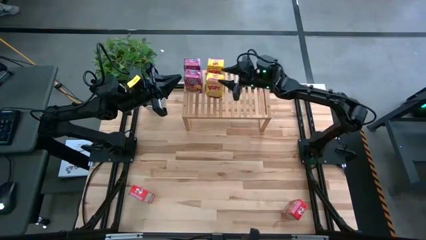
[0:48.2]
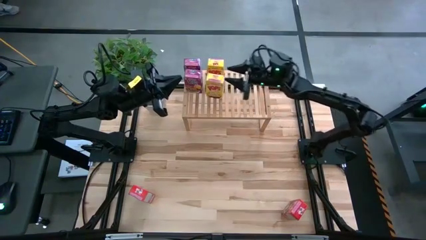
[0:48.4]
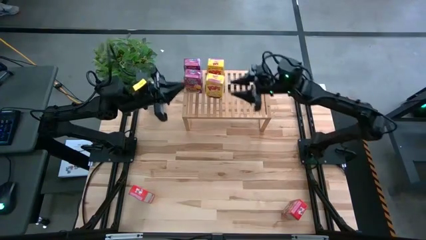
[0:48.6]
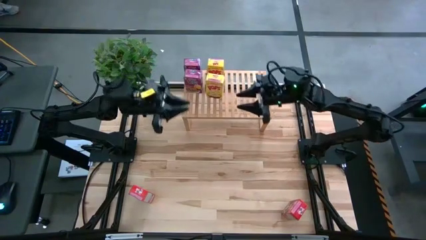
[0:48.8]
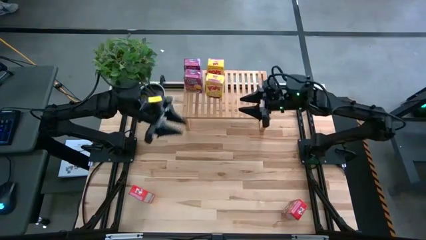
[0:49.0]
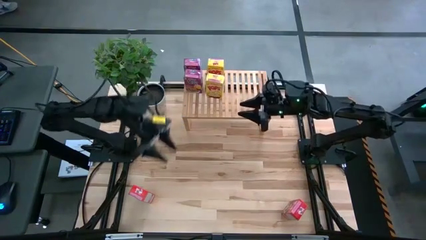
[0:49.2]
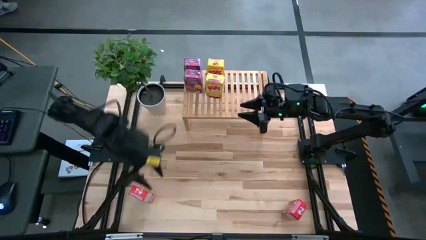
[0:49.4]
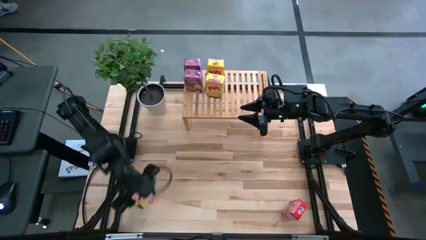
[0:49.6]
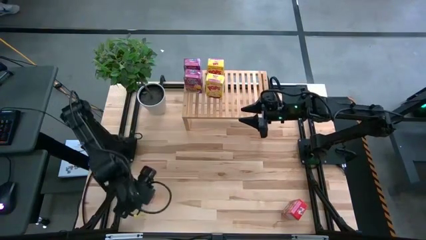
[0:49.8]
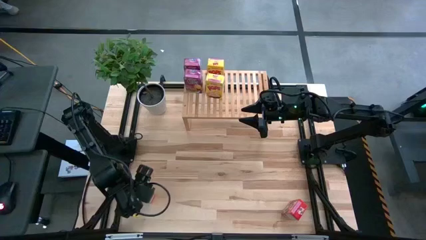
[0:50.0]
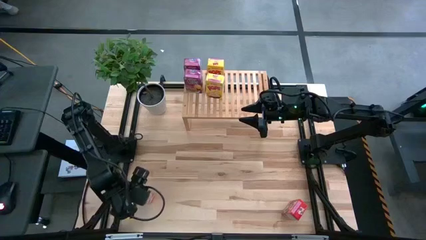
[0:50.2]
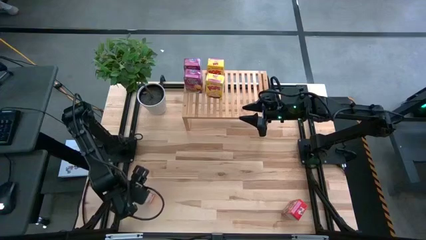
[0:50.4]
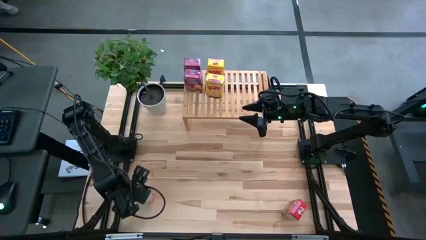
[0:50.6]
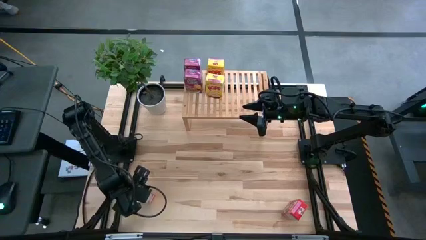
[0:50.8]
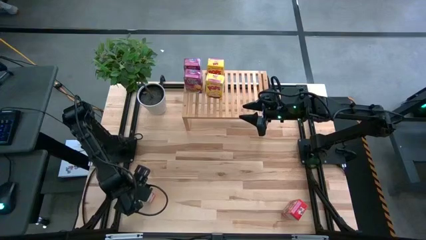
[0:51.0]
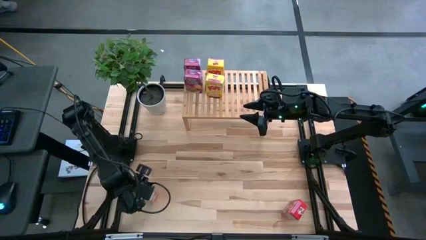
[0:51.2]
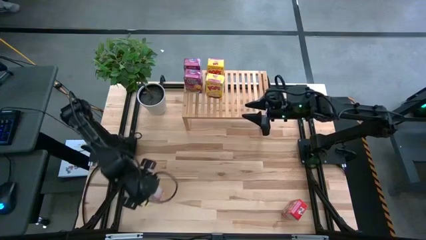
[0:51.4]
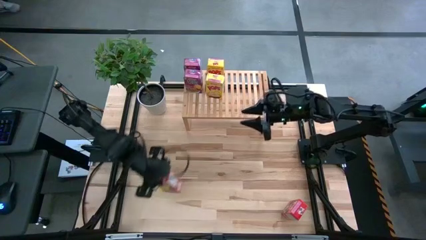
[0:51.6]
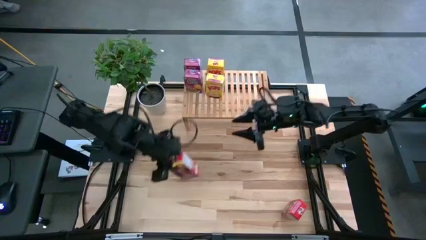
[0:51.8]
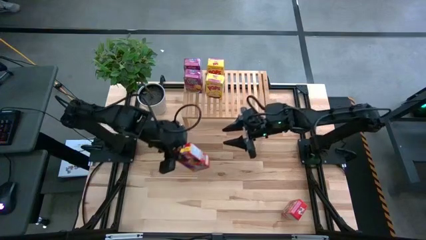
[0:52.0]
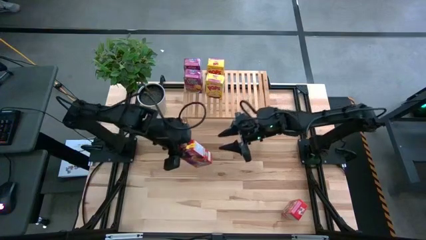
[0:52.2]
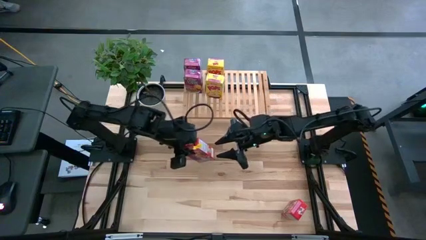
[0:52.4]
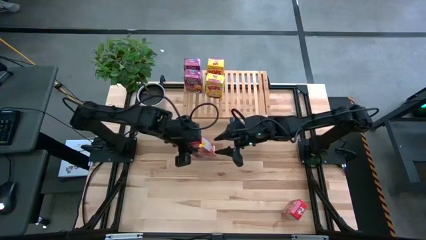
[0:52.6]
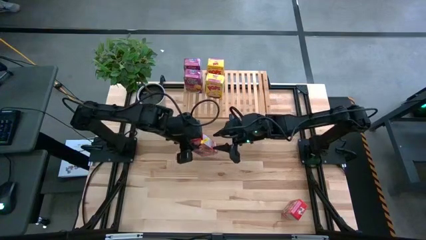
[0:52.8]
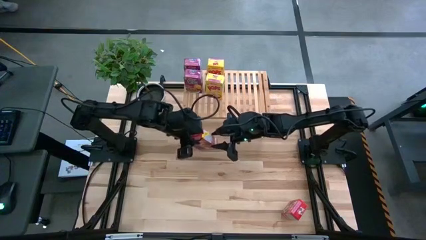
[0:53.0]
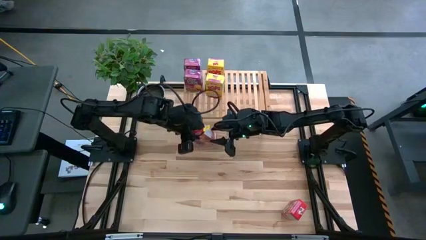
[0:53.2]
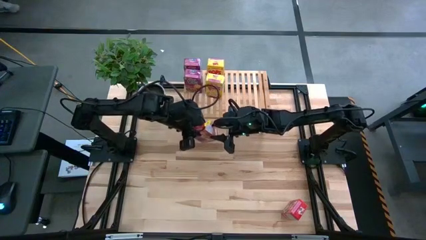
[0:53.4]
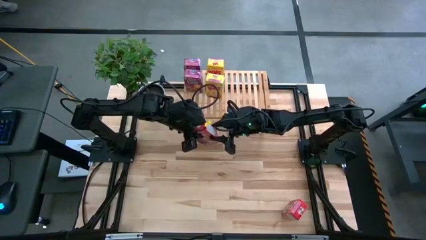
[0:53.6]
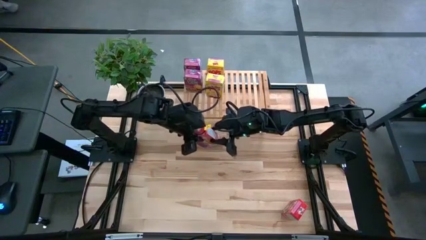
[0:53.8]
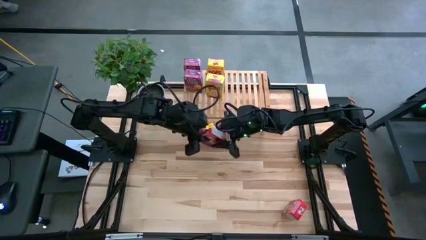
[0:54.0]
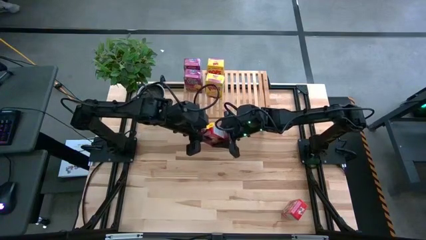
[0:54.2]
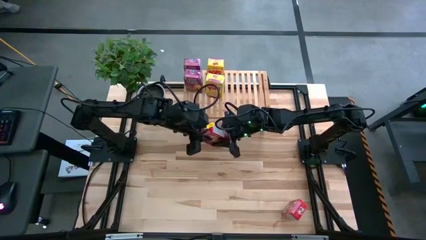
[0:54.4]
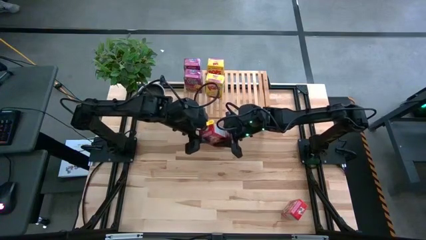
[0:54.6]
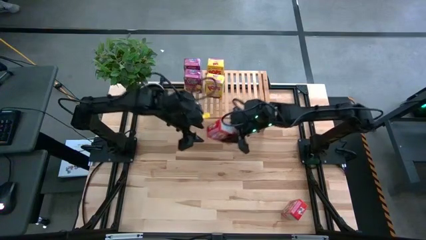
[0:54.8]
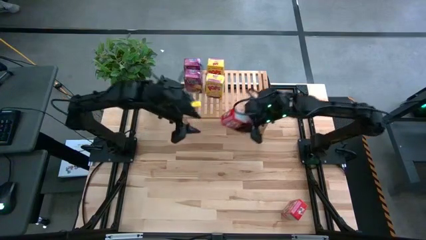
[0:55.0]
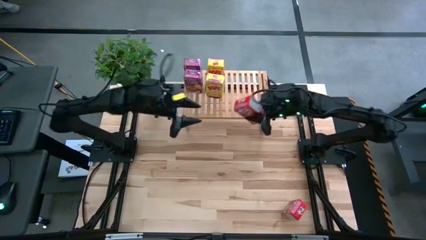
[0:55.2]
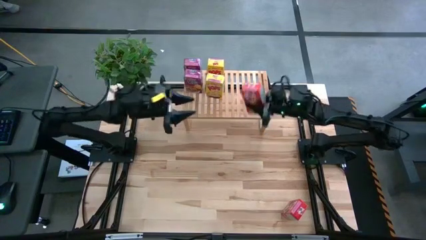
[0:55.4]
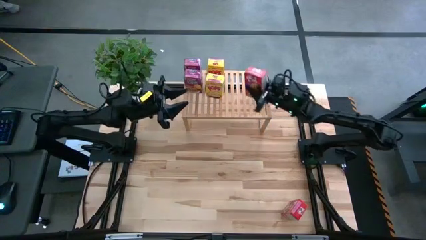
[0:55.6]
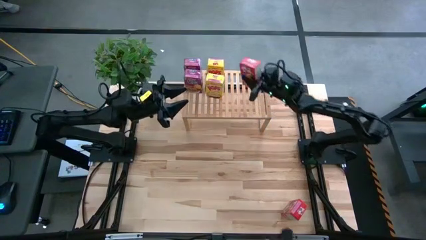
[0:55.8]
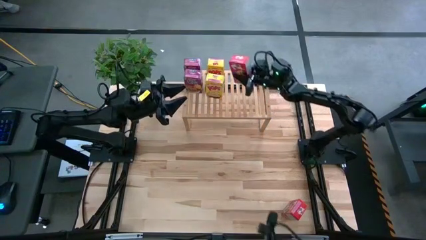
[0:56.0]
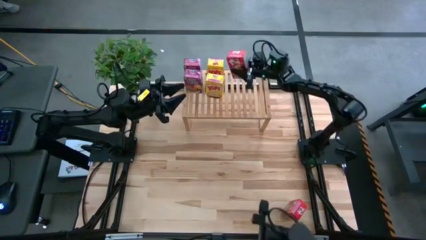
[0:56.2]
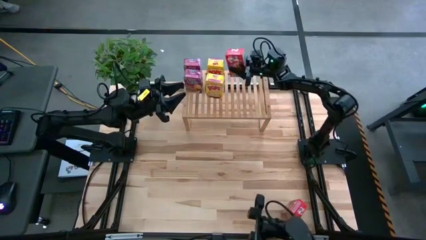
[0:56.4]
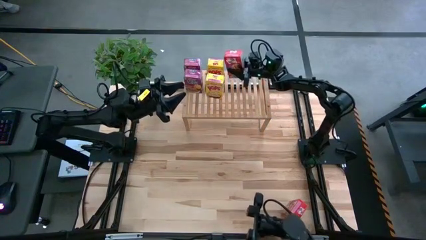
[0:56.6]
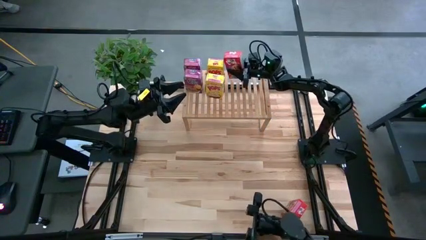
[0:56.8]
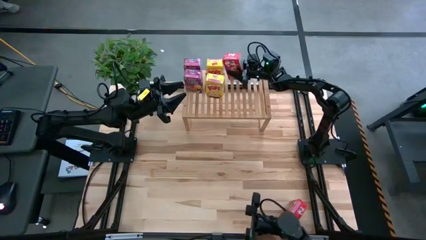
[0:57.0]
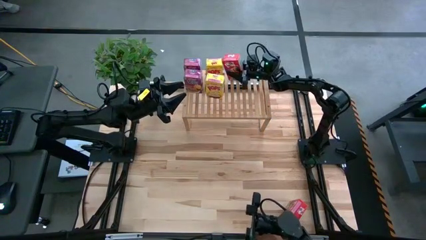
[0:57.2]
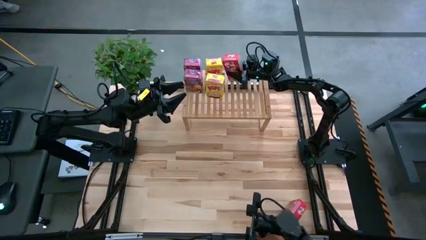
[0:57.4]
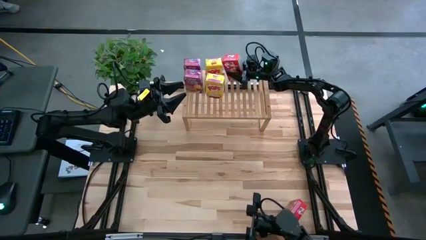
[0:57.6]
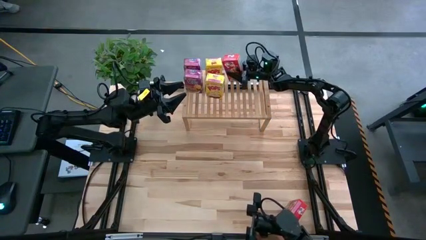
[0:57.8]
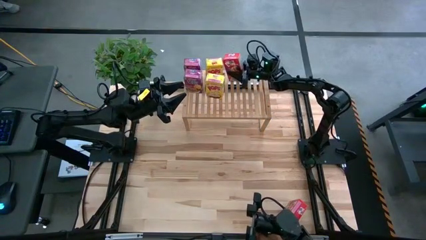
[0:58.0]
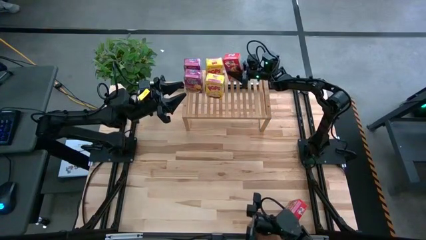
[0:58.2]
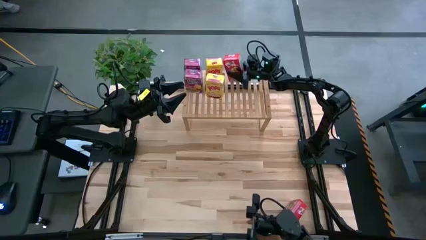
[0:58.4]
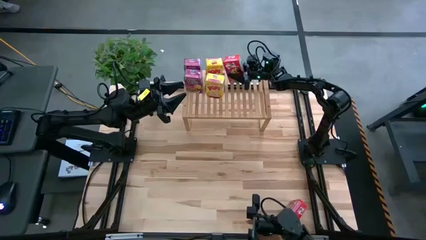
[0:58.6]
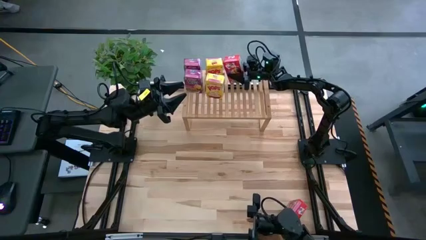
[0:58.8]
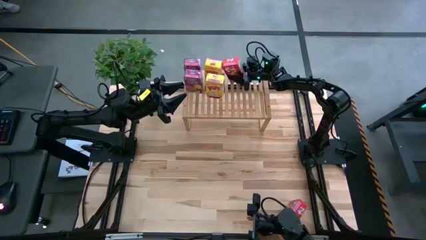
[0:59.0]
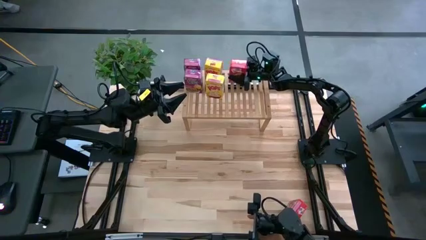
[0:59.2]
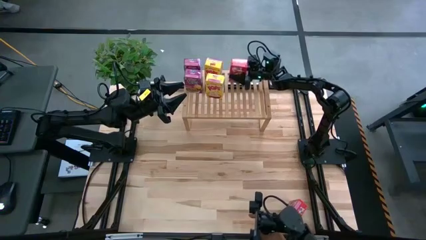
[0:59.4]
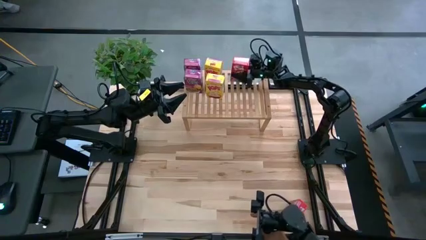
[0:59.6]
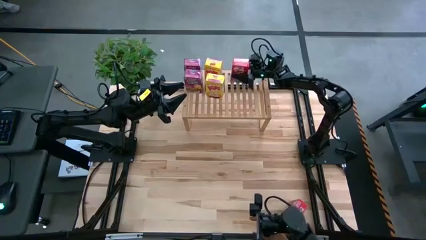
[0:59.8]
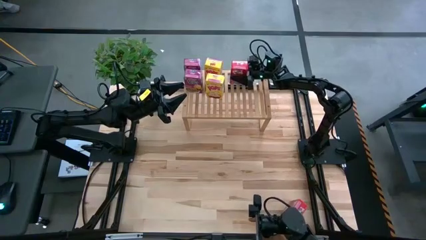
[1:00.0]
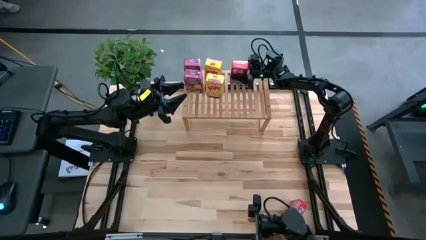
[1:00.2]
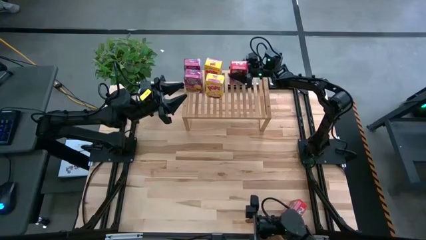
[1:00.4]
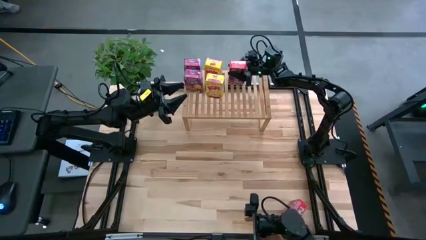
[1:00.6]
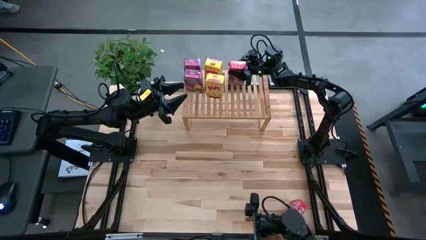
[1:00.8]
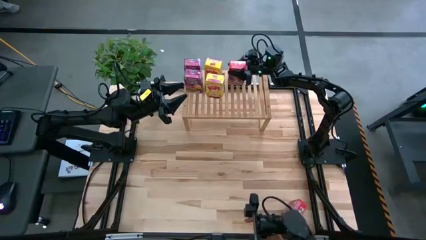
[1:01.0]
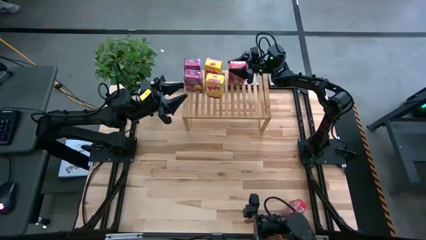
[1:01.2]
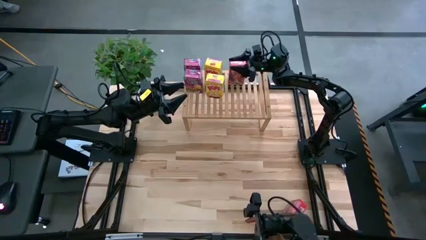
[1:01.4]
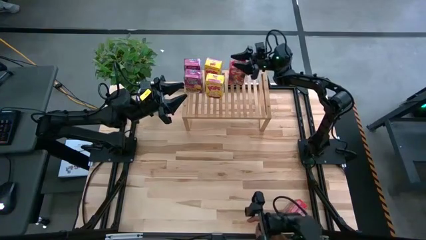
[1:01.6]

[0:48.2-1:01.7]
Task: Stack cereal on shelf
Put the left red cereal box on the shelf

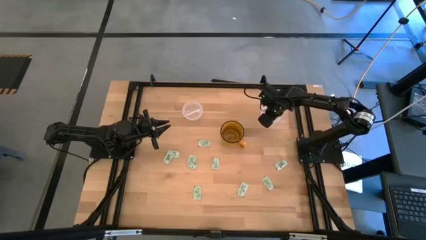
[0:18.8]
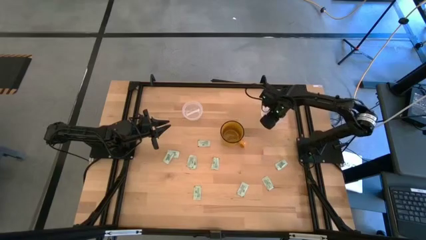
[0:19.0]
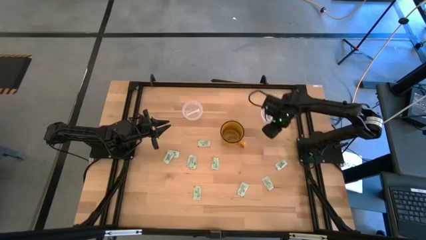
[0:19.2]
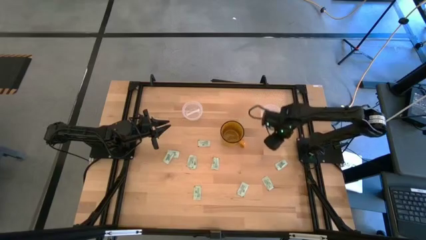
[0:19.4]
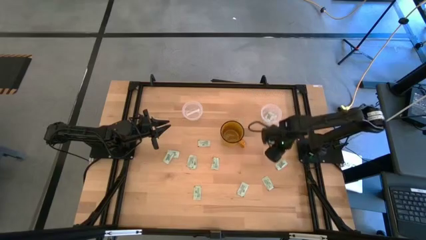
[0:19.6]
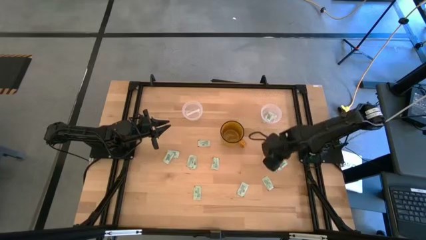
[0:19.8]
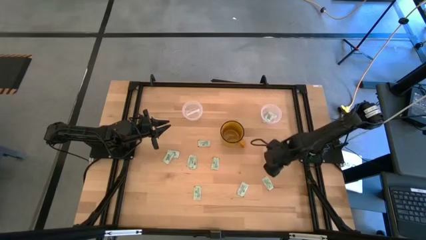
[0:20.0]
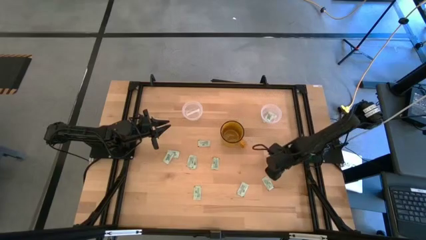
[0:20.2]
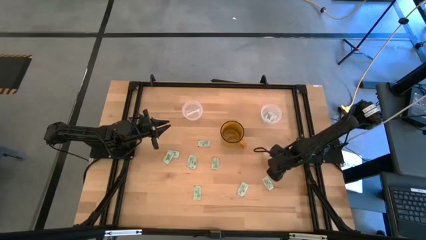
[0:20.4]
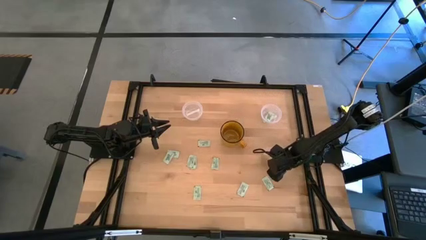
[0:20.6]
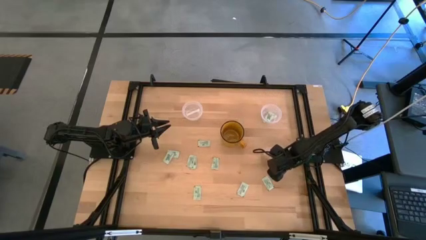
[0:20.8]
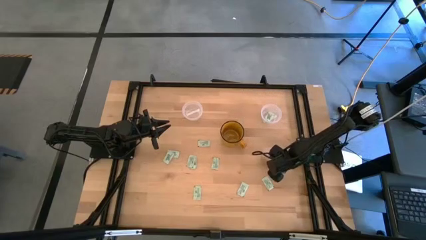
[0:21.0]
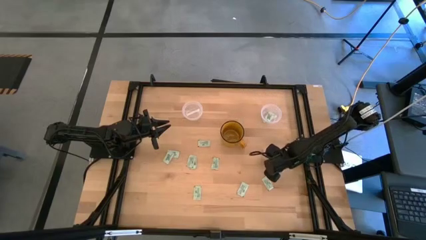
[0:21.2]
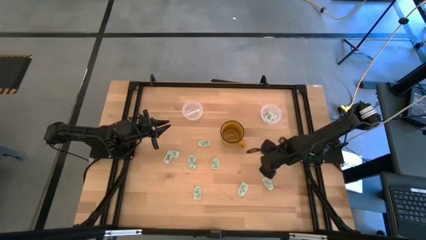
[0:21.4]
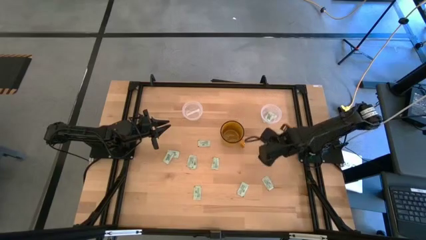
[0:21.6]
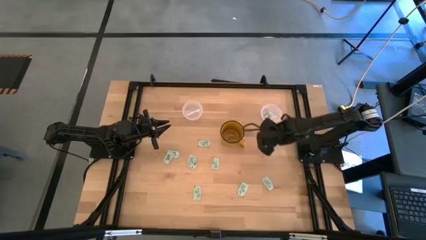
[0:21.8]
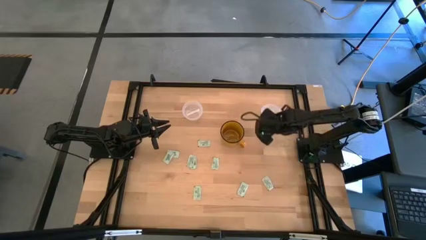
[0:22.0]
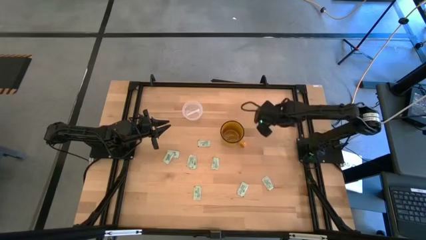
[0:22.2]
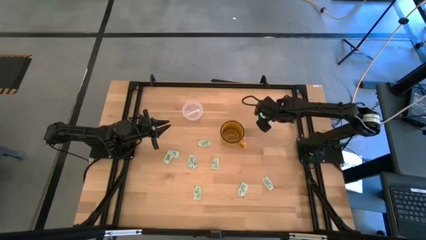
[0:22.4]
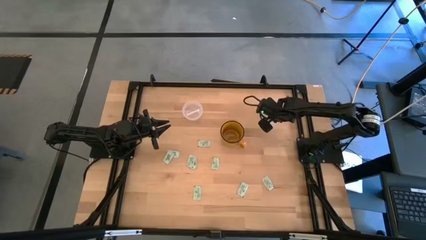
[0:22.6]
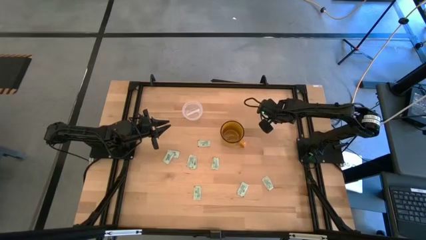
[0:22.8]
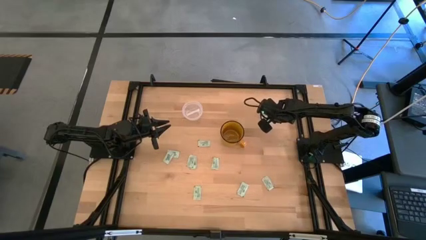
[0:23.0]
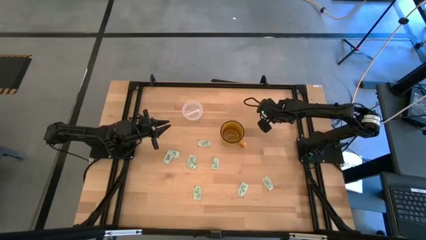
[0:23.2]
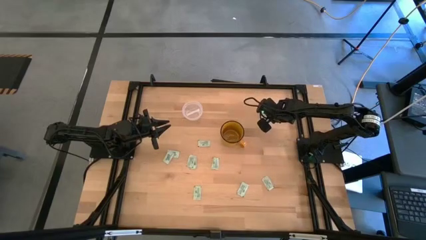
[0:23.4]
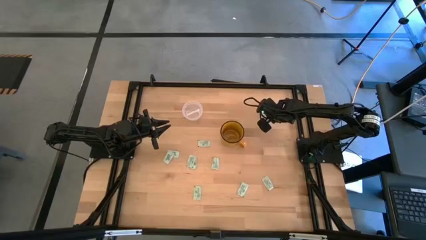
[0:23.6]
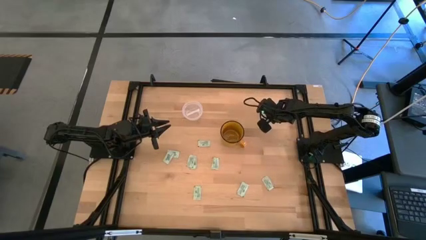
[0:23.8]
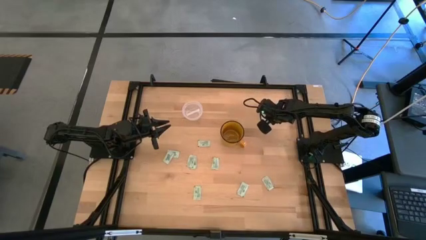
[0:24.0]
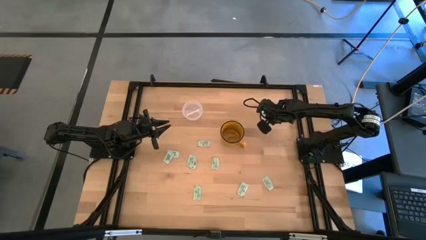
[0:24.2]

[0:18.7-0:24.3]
Task: Pick and place Stevia / Truvia into bins
Put the white stevia packet into the right transparent container
